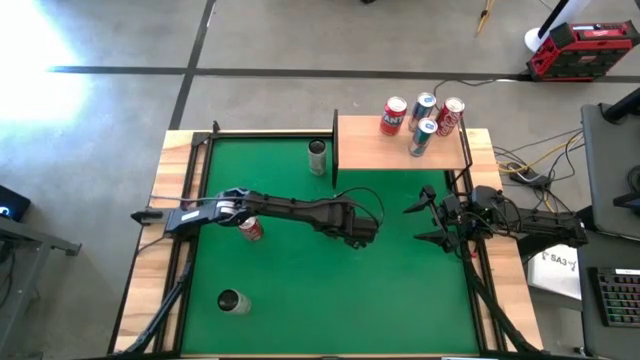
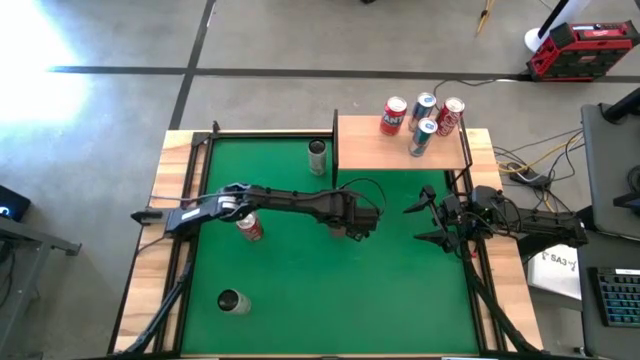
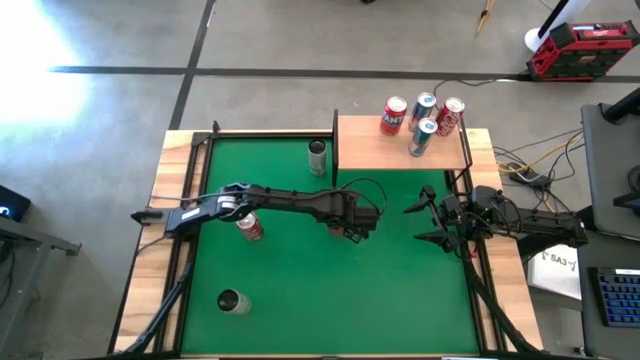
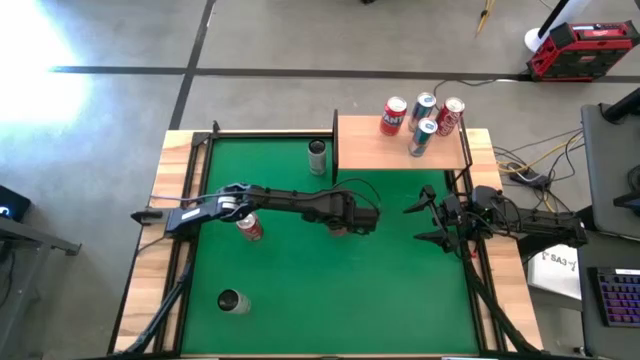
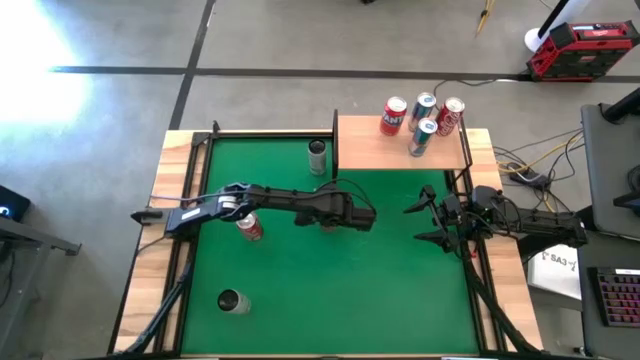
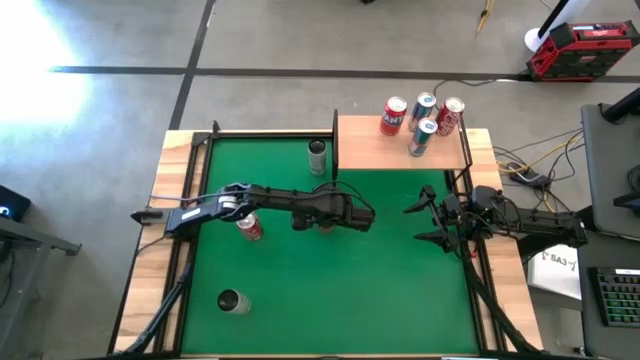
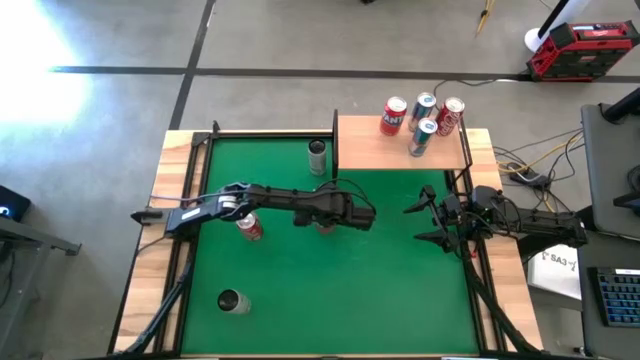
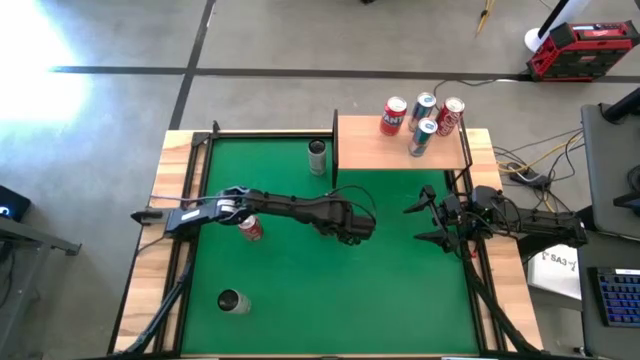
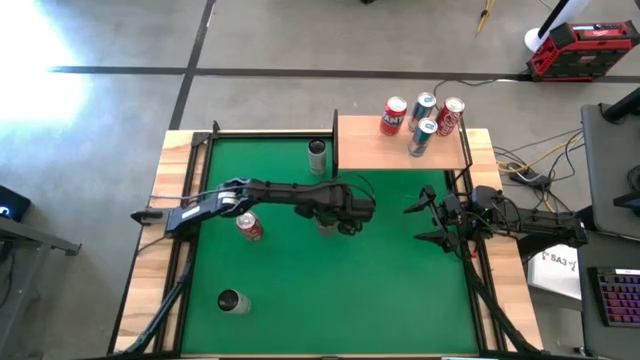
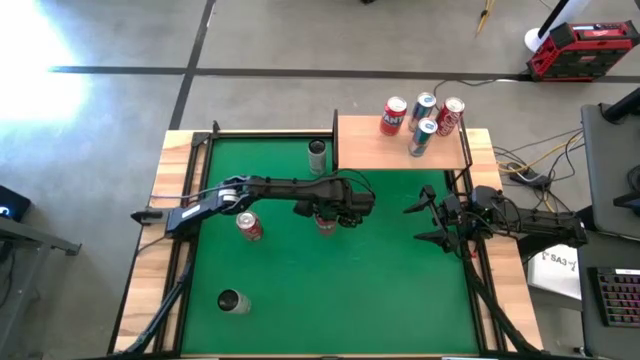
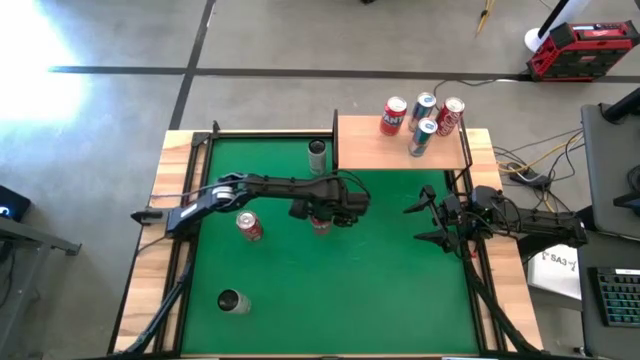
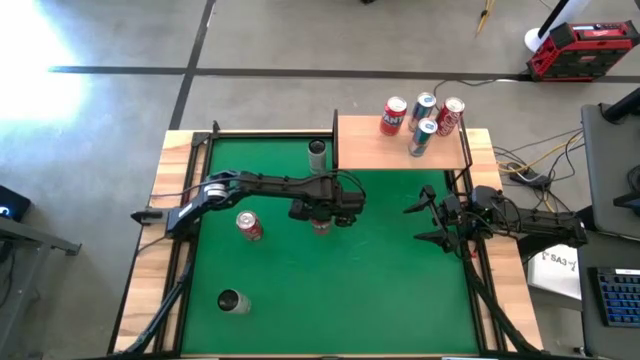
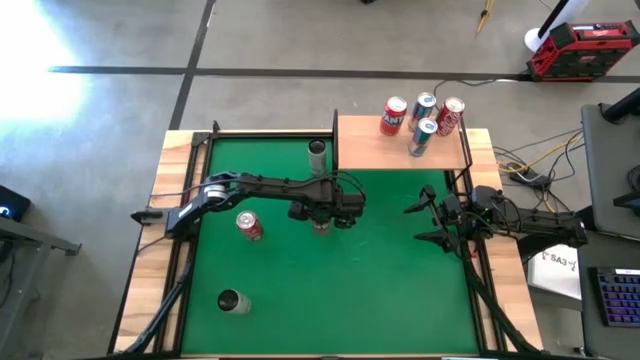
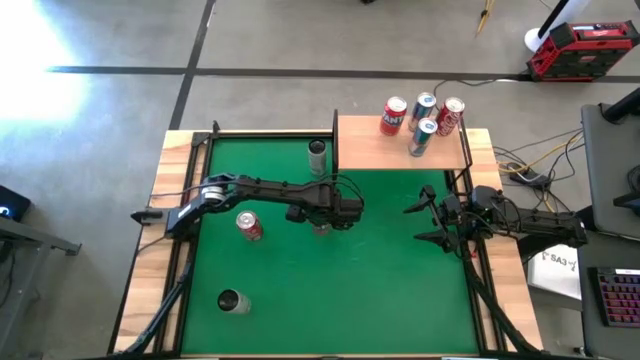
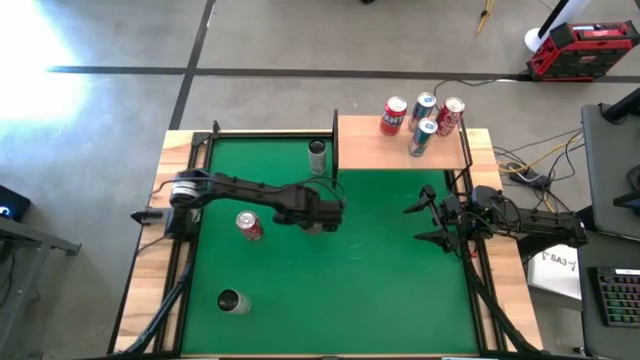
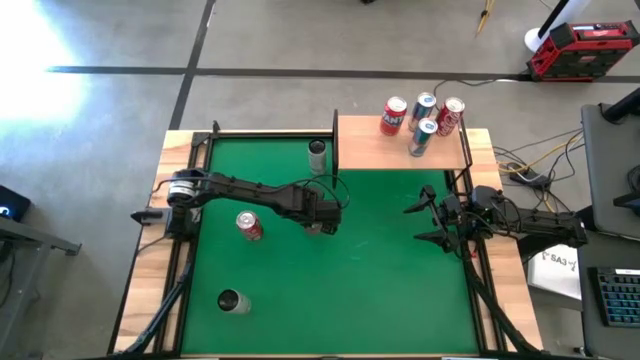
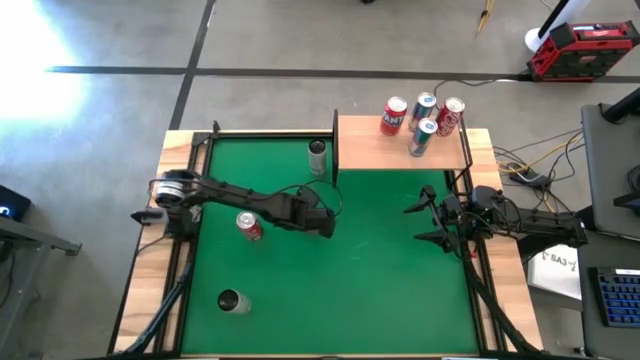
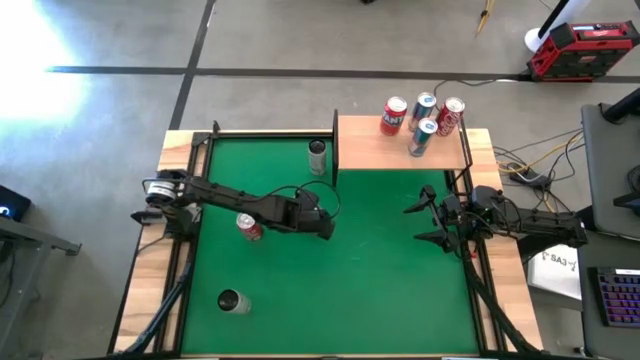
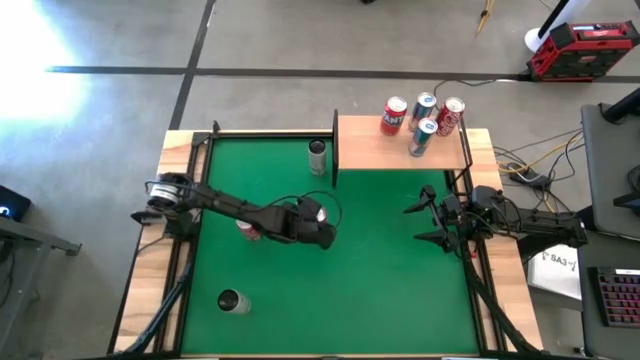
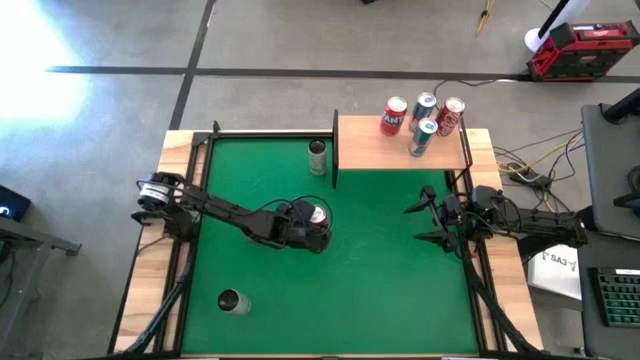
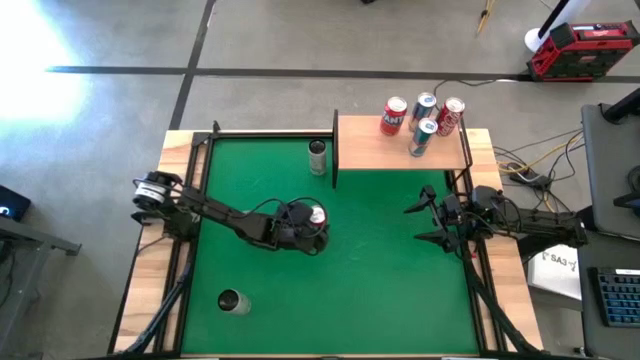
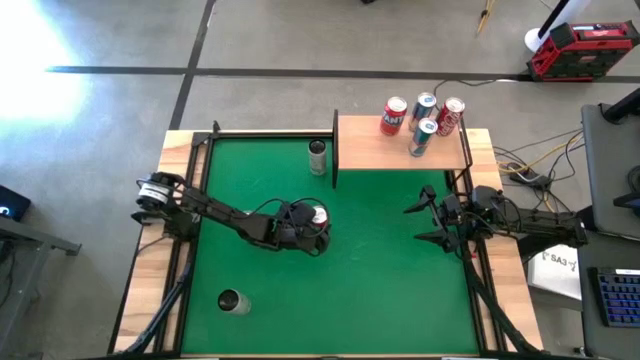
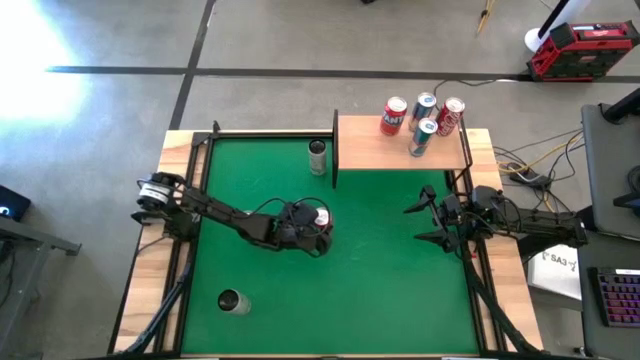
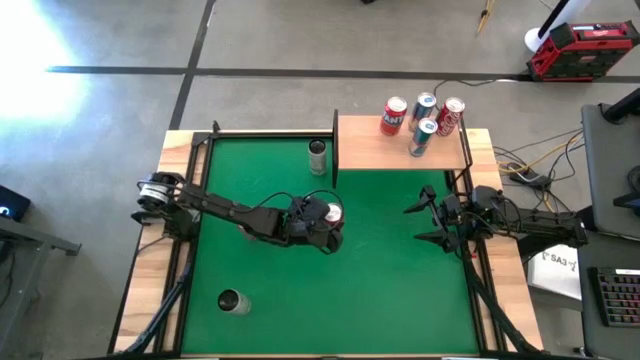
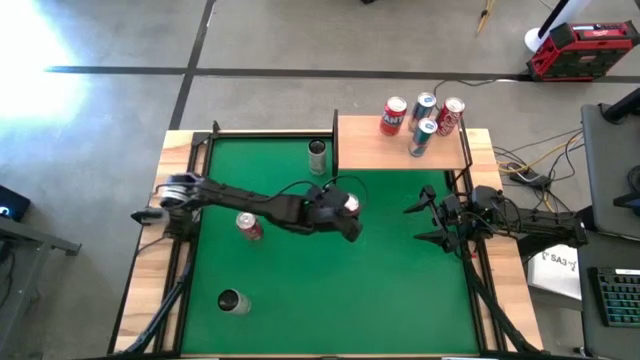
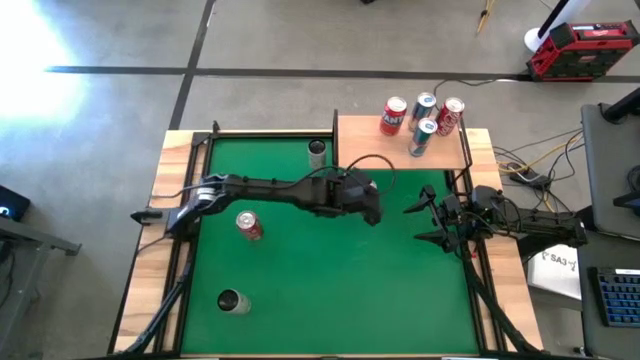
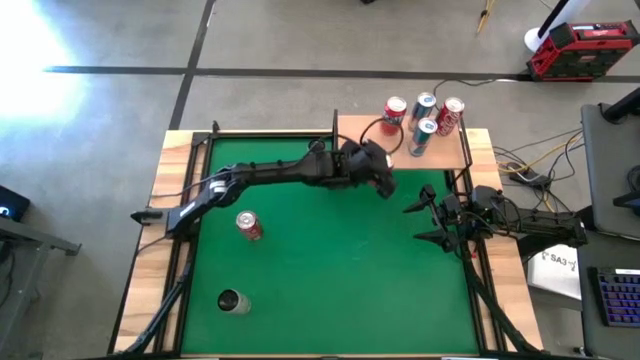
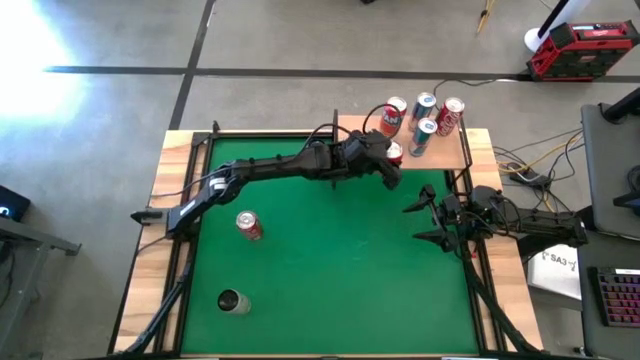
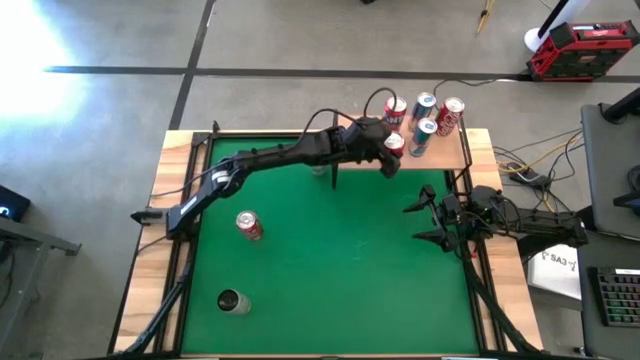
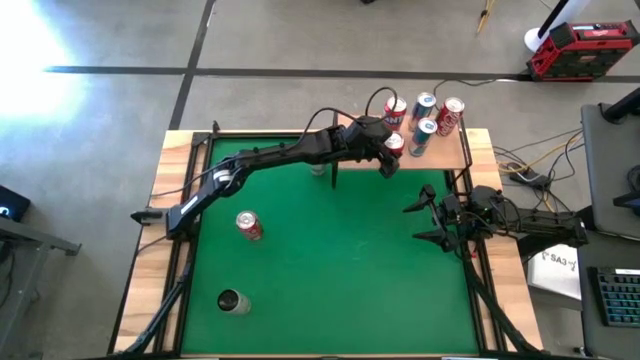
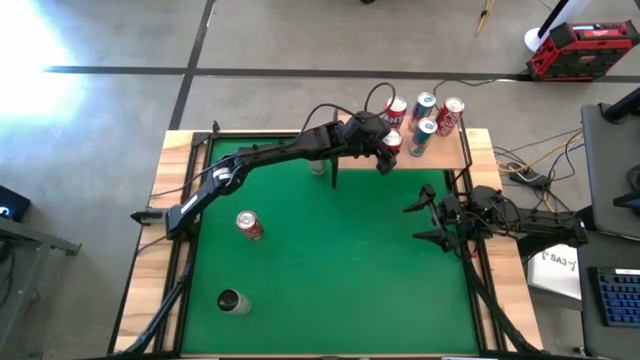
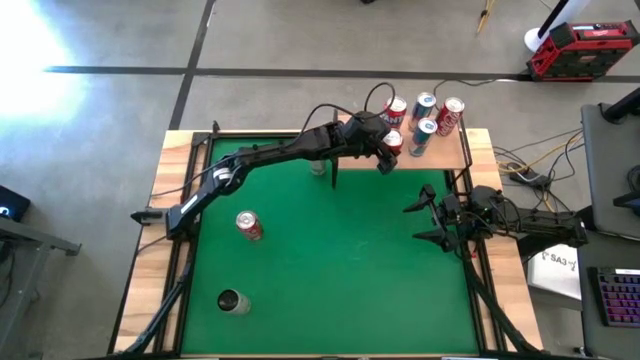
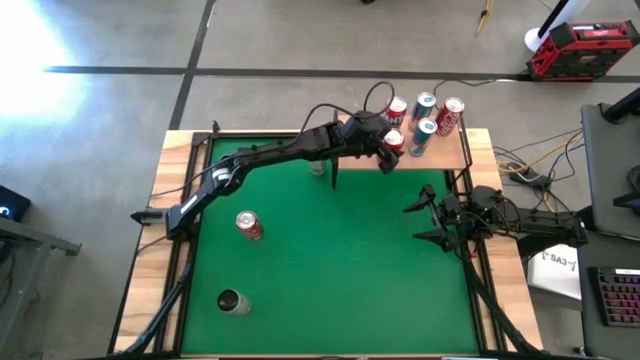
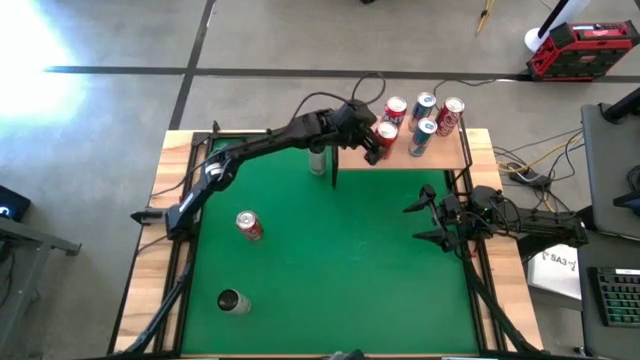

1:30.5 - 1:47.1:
Task: Place canned beverage on shelf
Put the red soda can on the shelf aligned with the other red soda can
